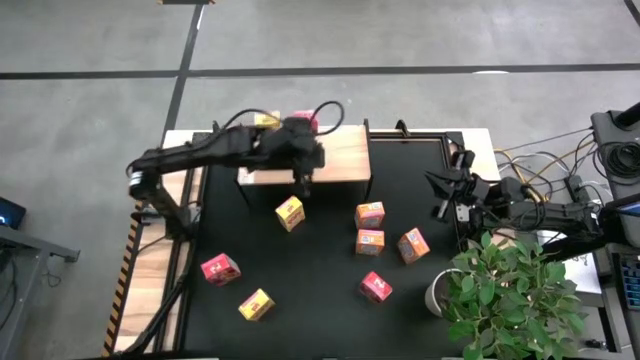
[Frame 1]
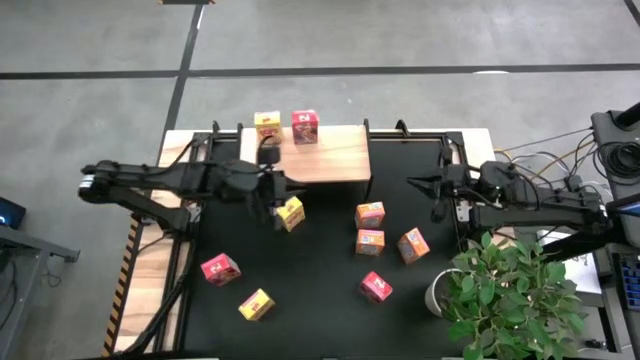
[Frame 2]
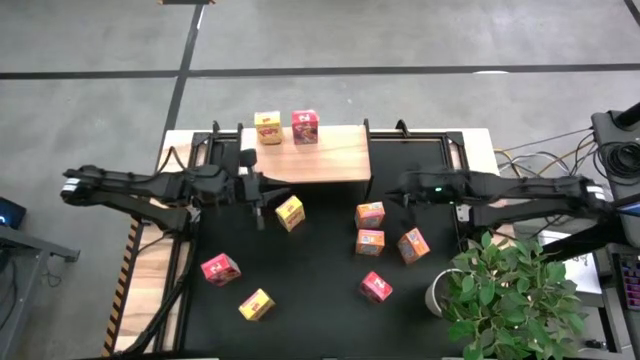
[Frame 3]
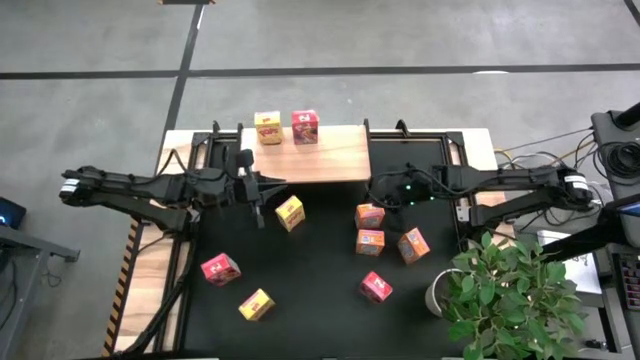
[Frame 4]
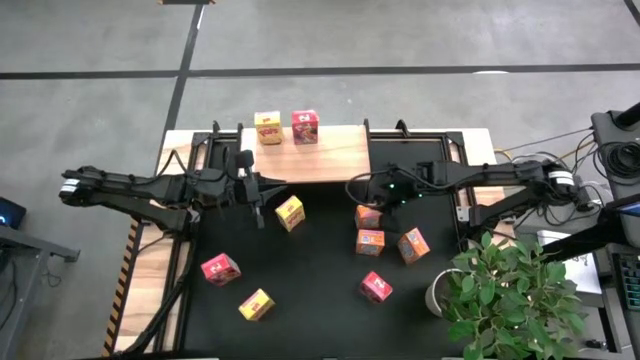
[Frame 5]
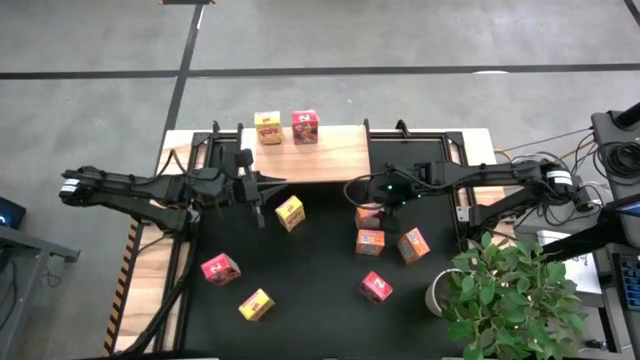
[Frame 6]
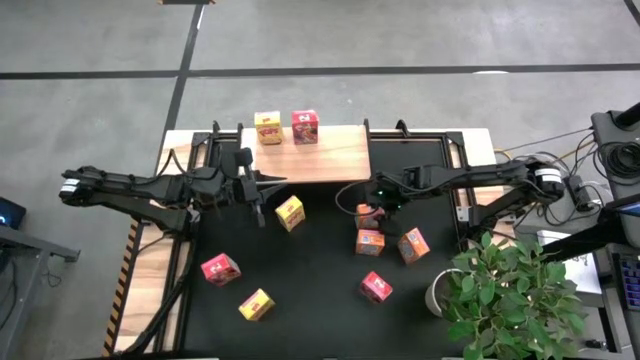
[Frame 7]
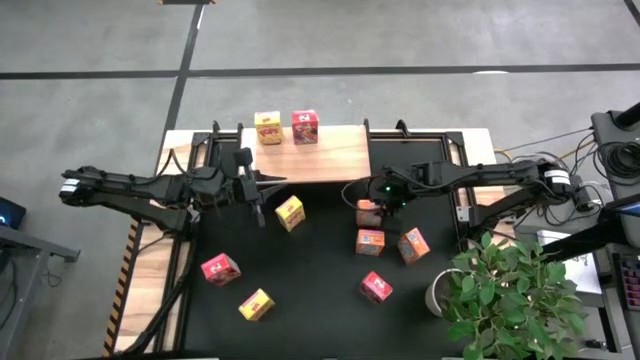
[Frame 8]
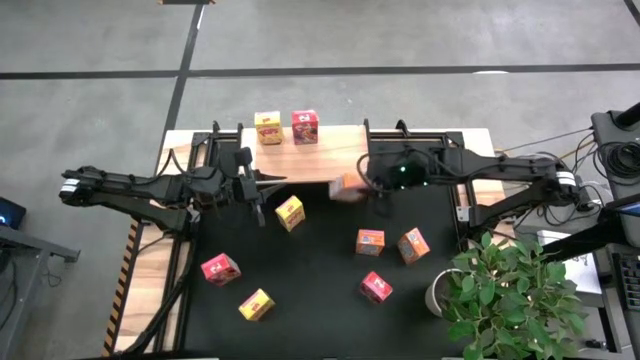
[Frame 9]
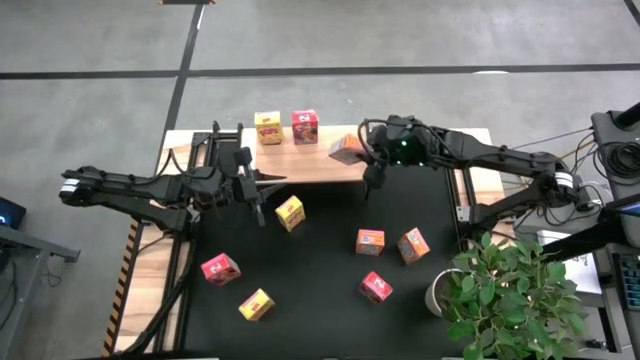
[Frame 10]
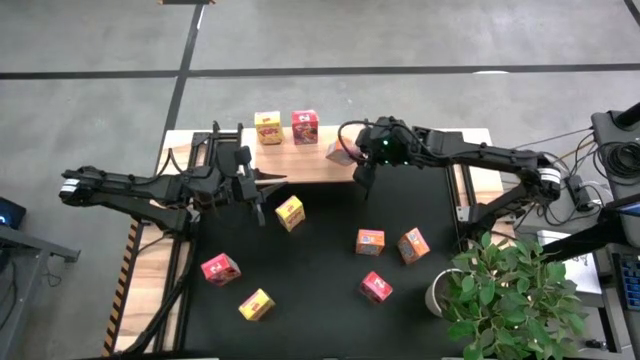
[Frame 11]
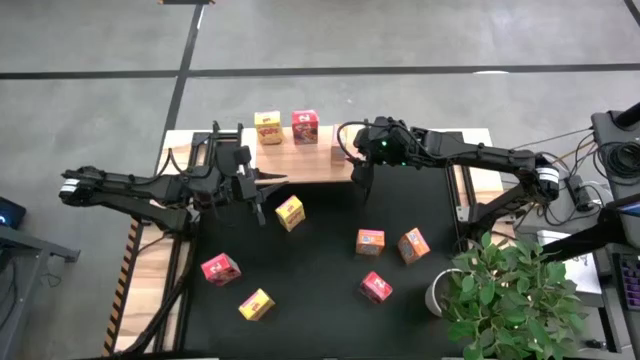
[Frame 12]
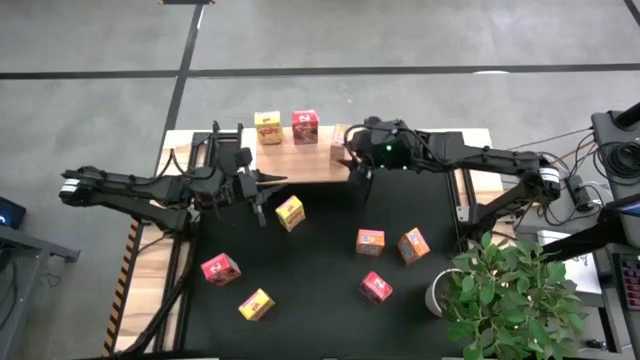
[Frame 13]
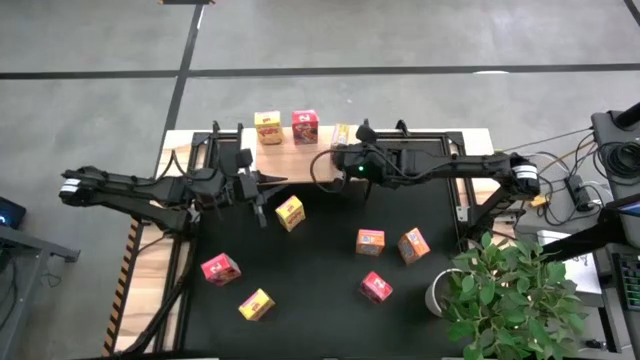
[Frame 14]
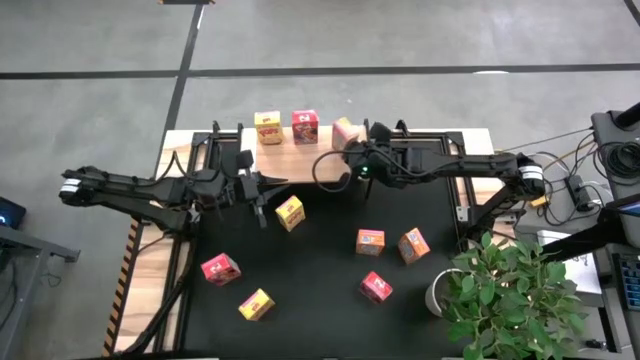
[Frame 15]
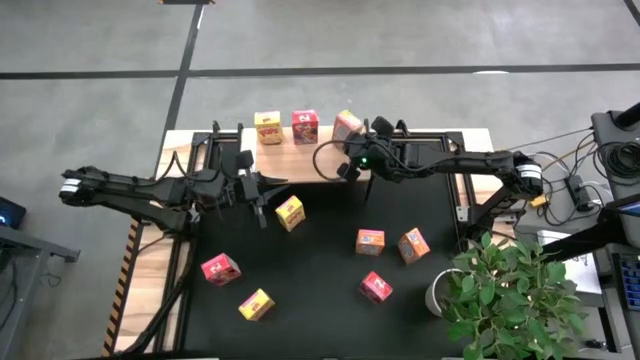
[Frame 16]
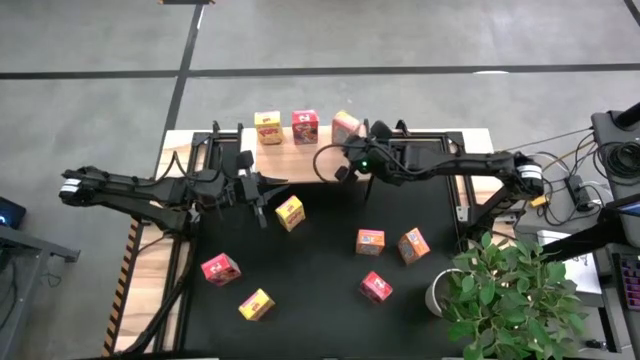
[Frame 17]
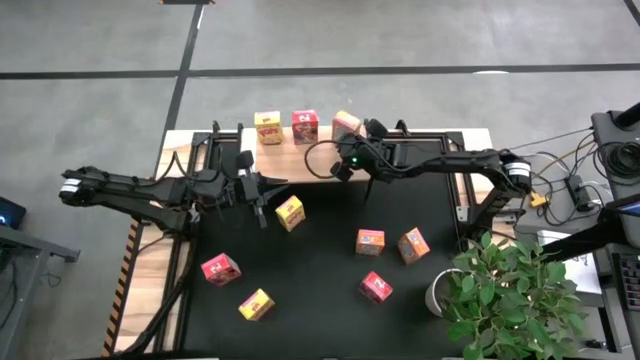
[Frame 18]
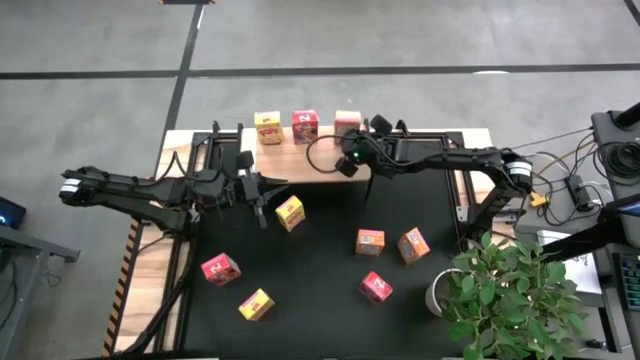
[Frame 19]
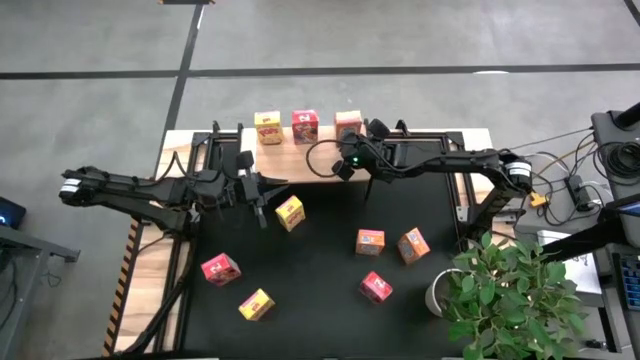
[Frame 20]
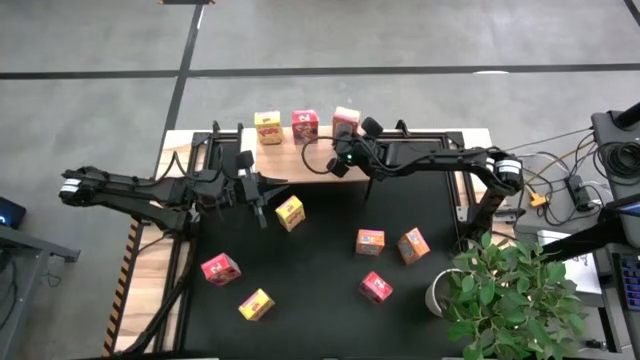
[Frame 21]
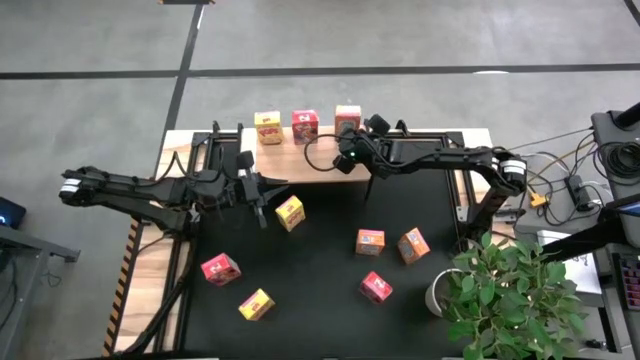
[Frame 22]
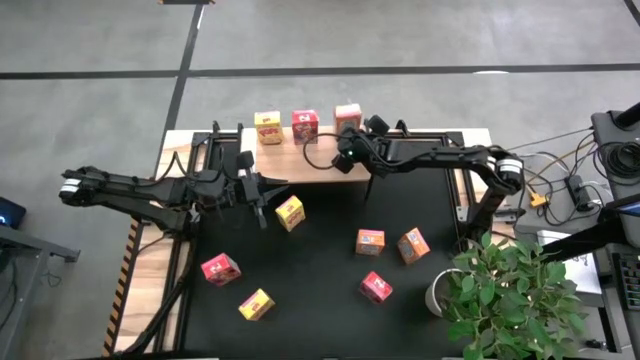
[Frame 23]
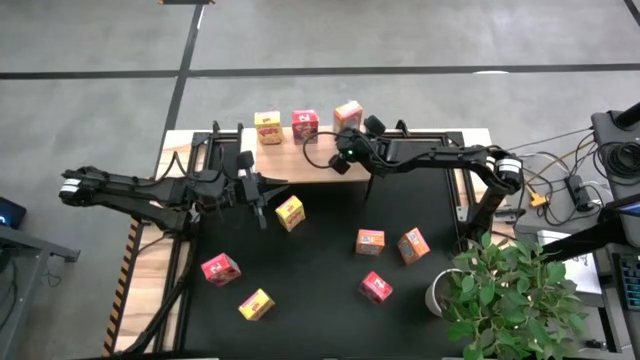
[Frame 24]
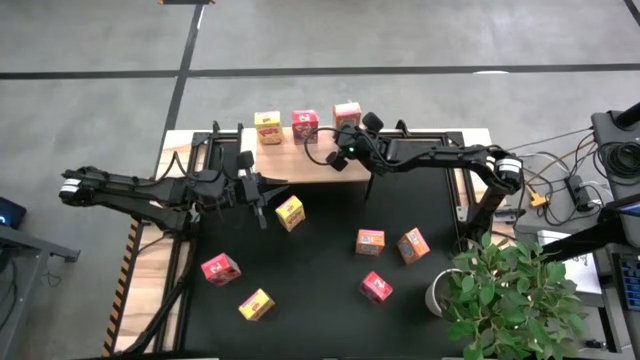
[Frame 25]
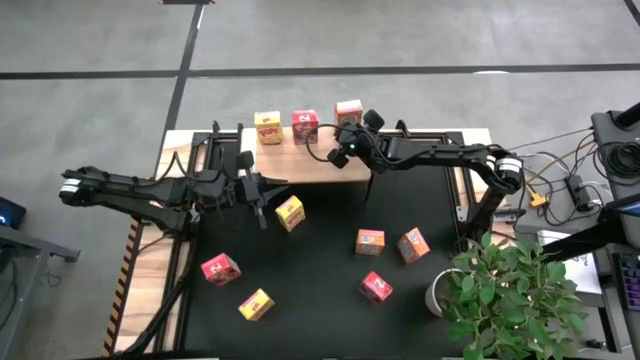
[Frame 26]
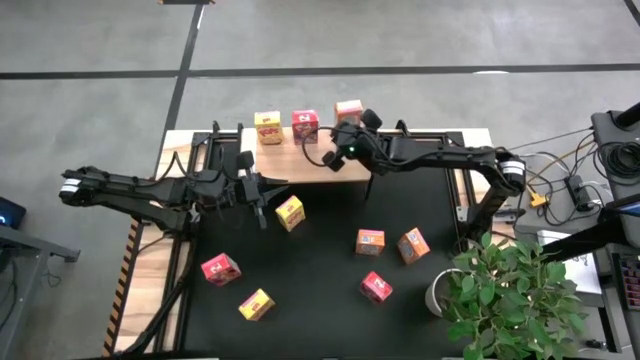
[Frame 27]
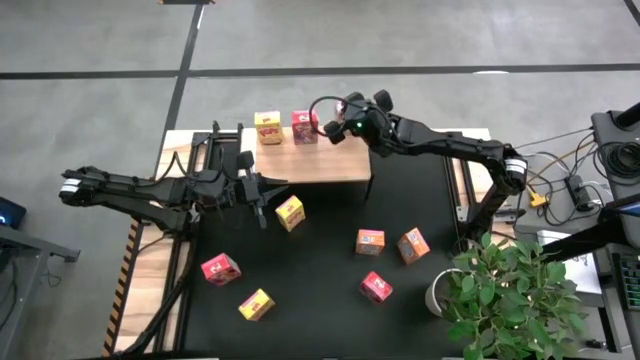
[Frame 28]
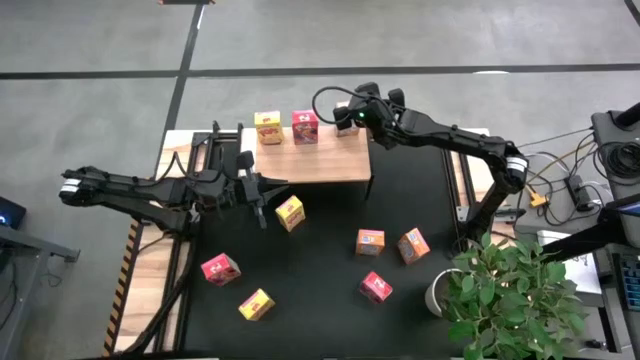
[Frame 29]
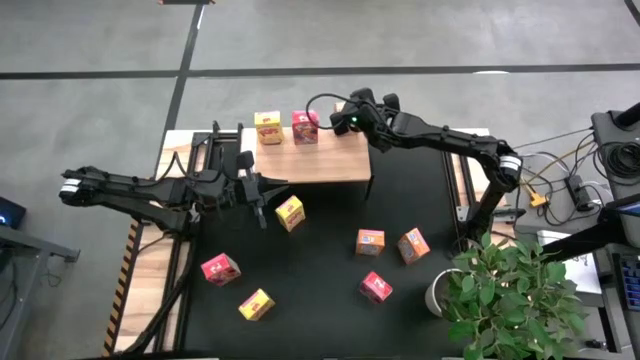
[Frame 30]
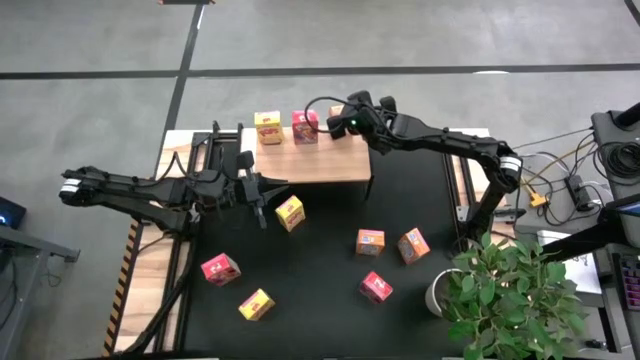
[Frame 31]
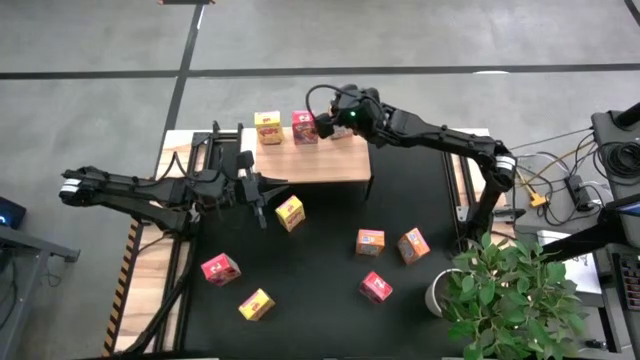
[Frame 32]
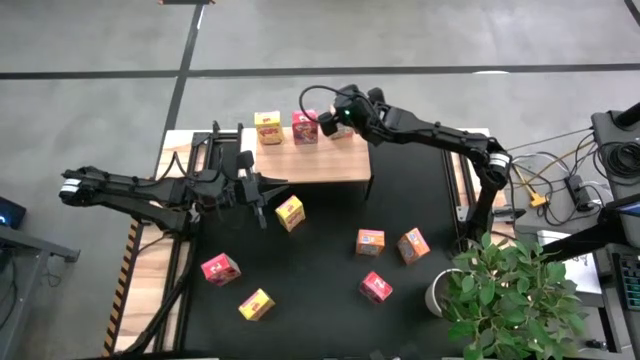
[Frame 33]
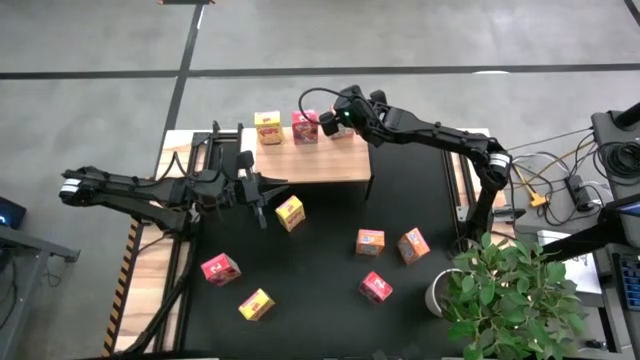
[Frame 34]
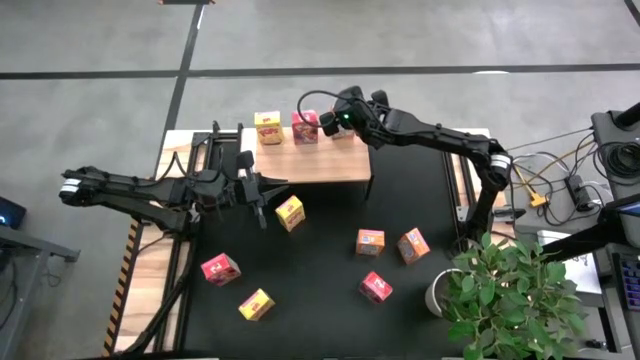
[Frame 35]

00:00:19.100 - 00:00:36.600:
Task: Stack cereal on shelf
Put the top orange cereal box on the shelf

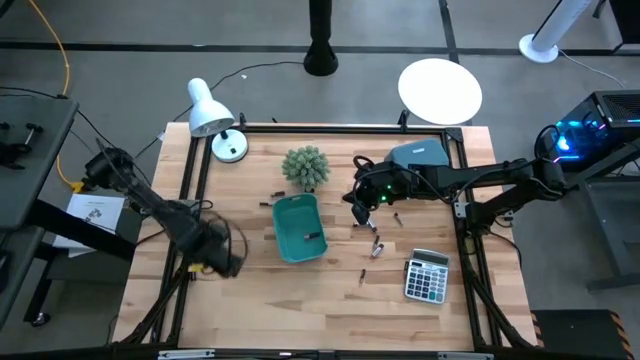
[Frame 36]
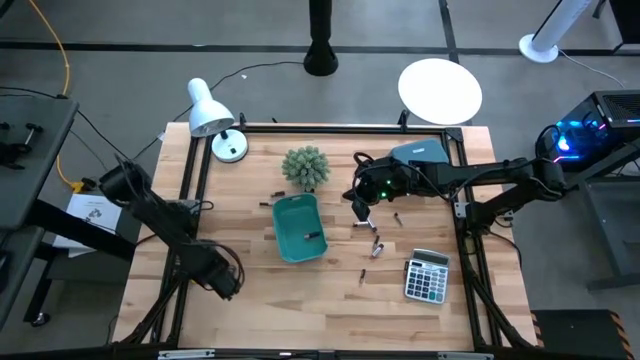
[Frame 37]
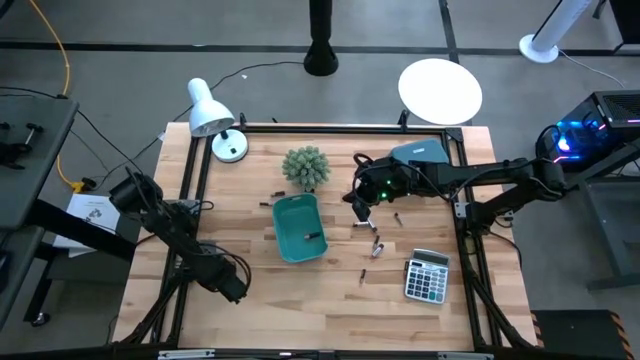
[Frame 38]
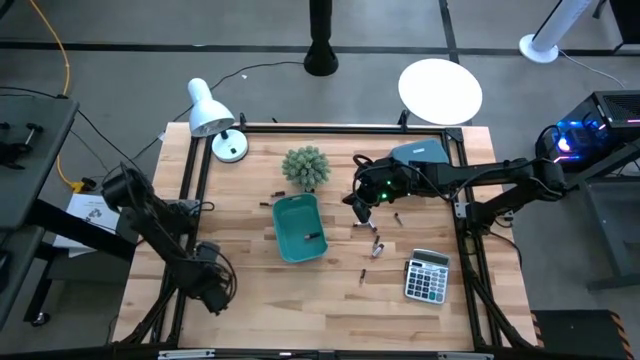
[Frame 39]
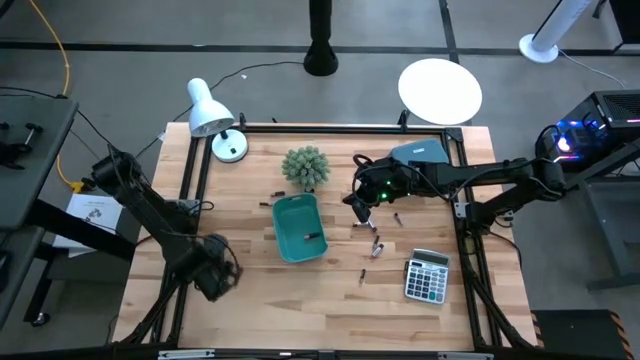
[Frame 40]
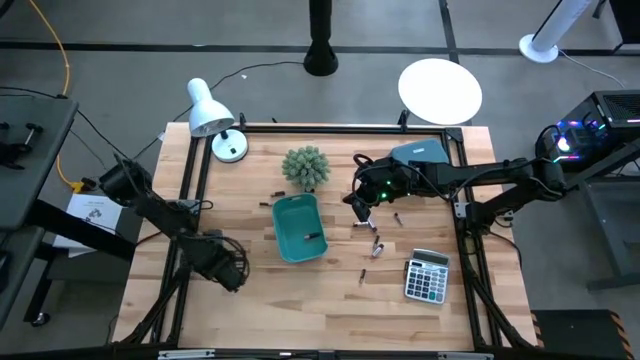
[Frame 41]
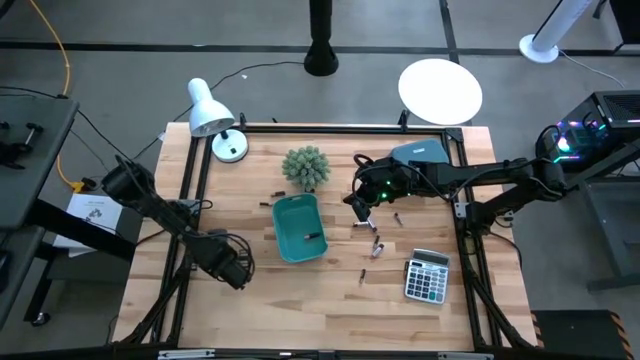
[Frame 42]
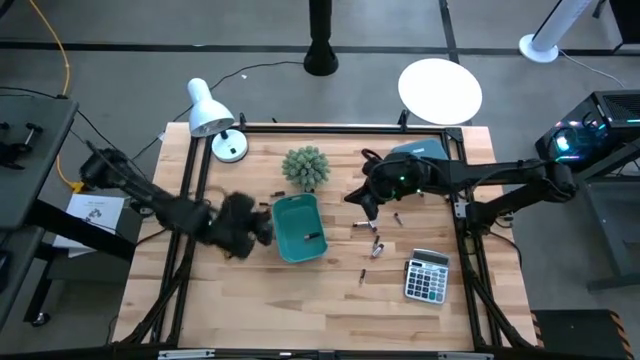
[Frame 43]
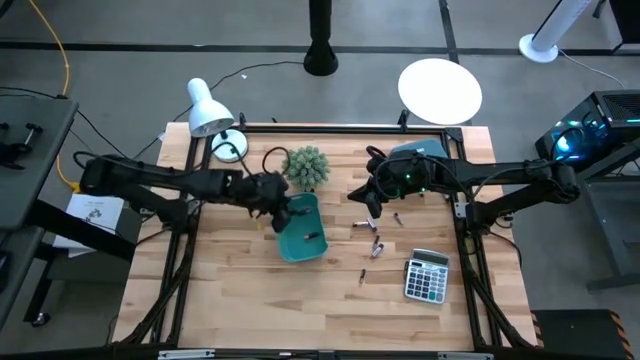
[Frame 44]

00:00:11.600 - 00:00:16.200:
Task: Sort batteries
Put the black battery into the green bin
